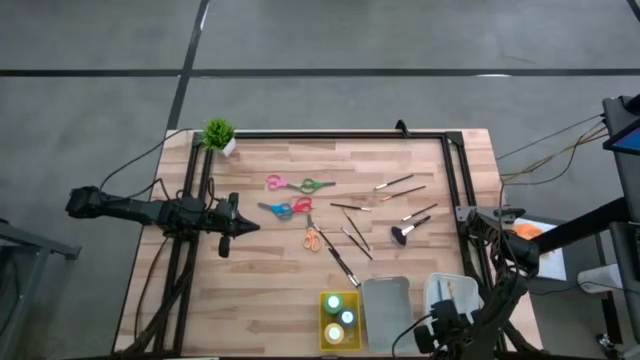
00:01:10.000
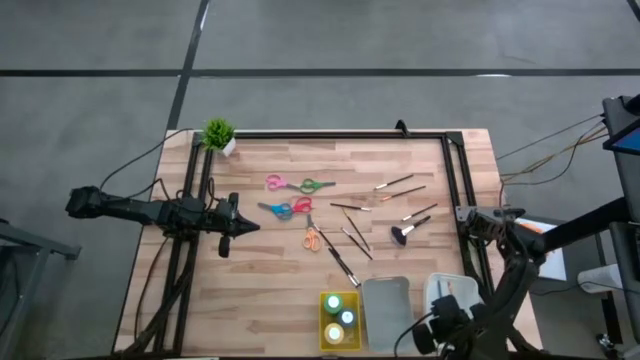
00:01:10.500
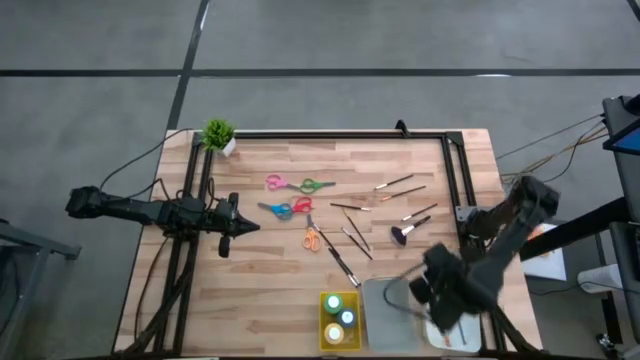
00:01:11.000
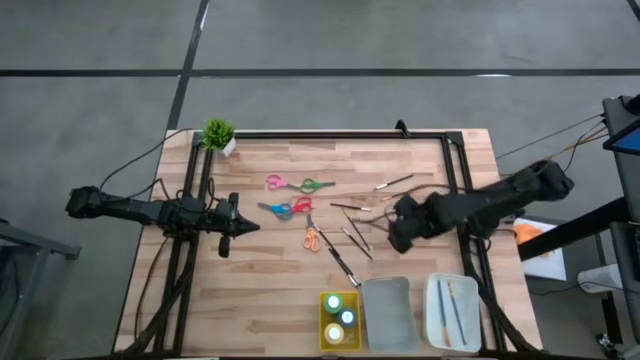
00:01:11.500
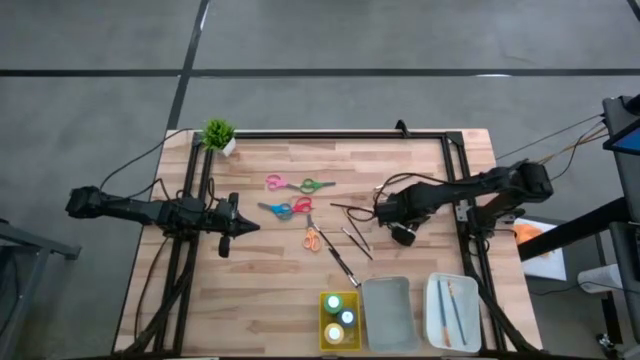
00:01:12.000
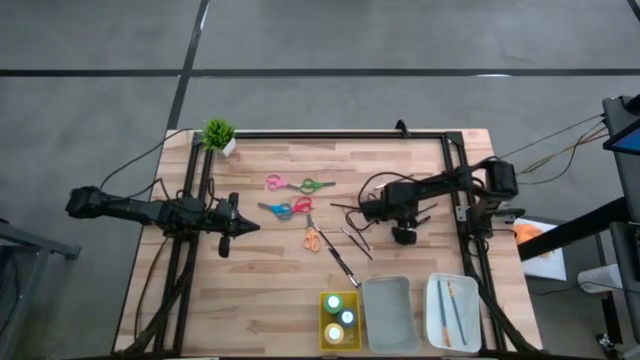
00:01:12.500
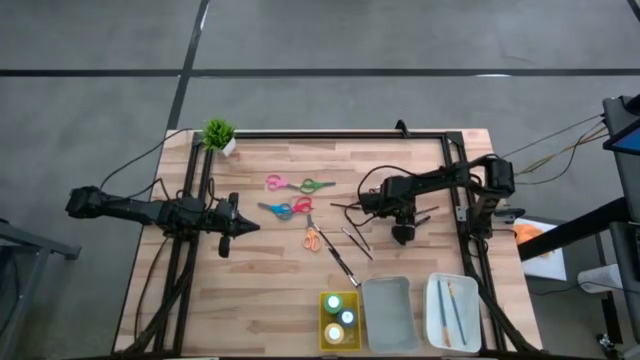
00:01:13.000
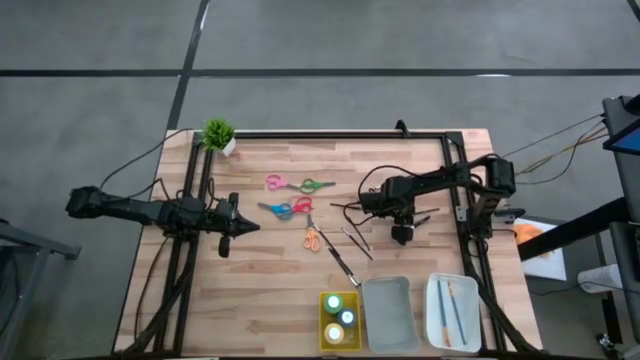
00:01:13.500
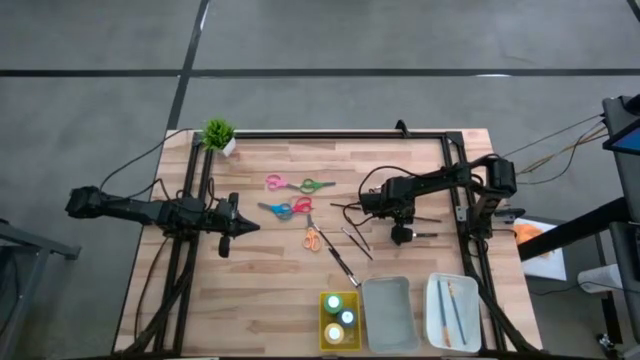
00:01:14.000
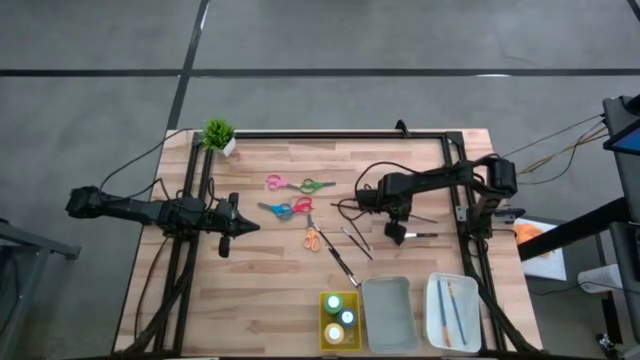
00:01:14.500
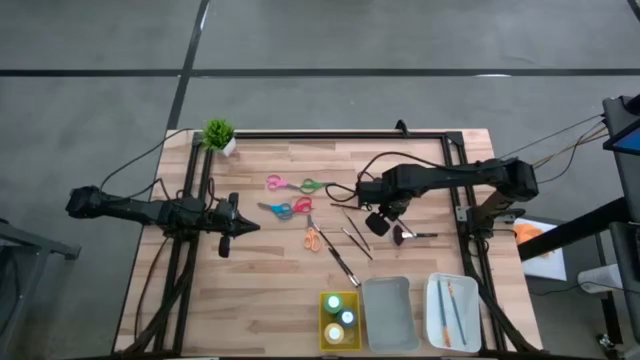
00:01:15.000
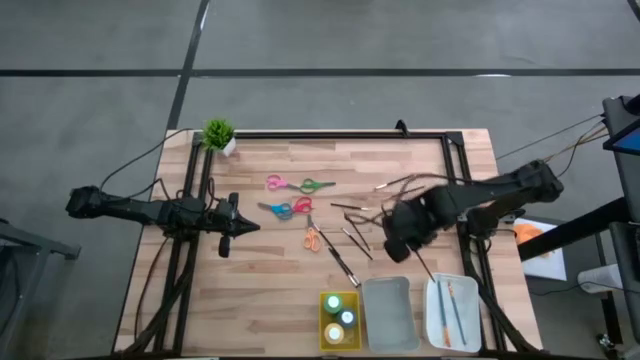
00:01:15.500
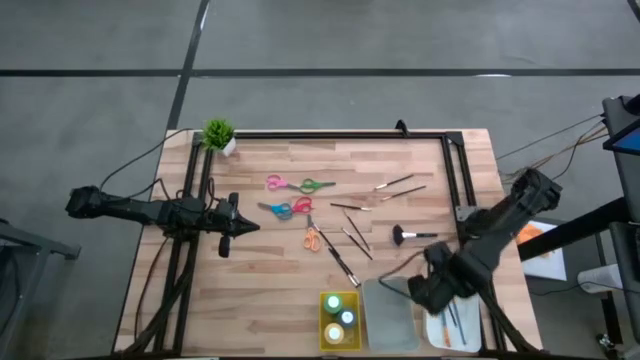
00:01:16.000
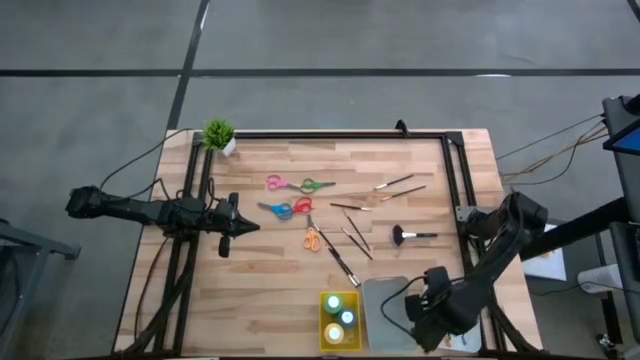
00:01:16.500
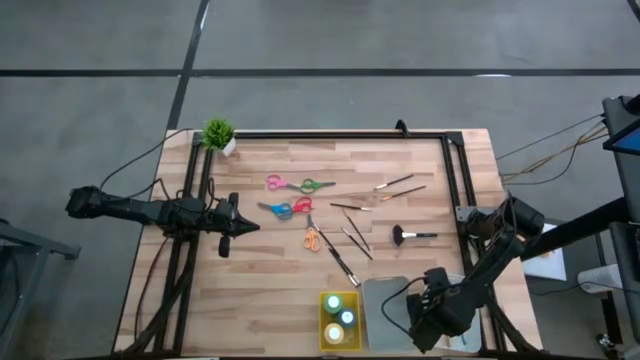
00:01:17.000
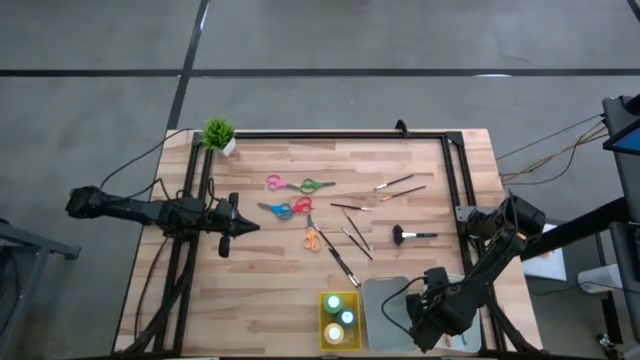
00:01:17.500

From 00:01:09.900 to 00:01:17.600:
Task: Pick & Place Paint Supplies
Put the silver brush into the white bin

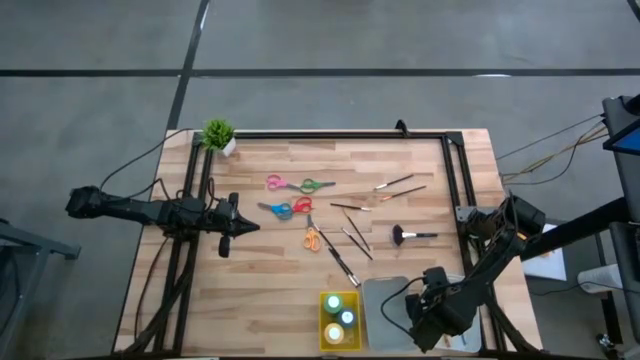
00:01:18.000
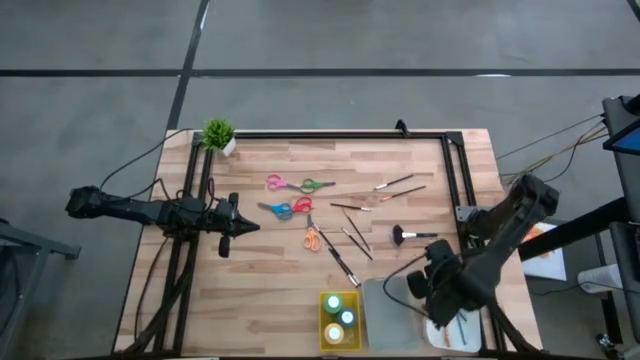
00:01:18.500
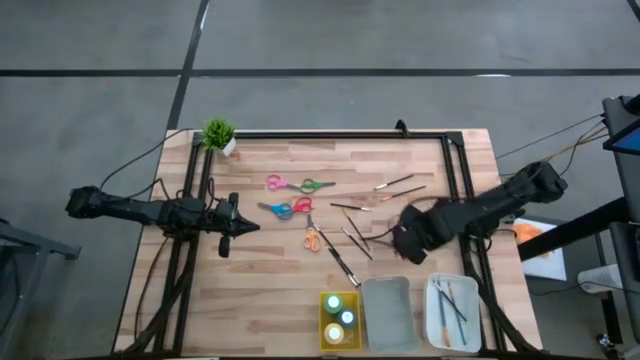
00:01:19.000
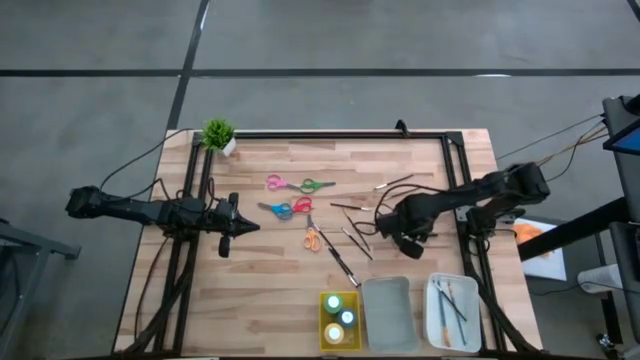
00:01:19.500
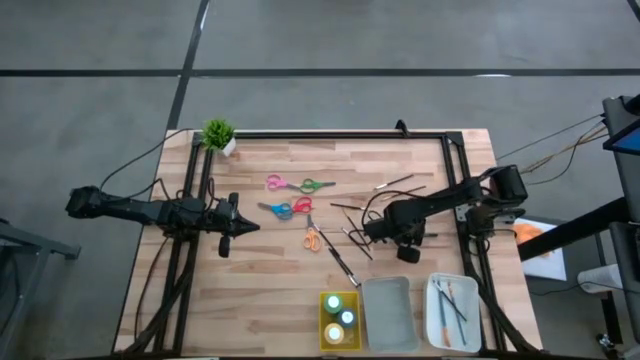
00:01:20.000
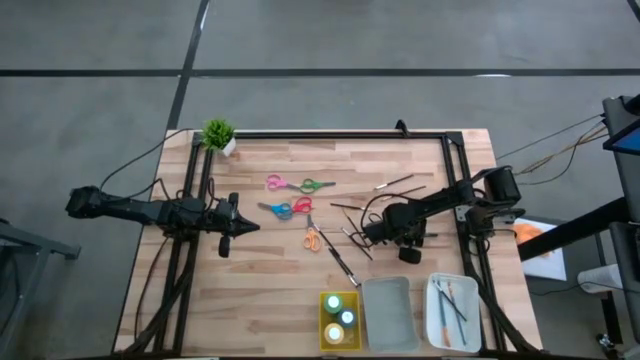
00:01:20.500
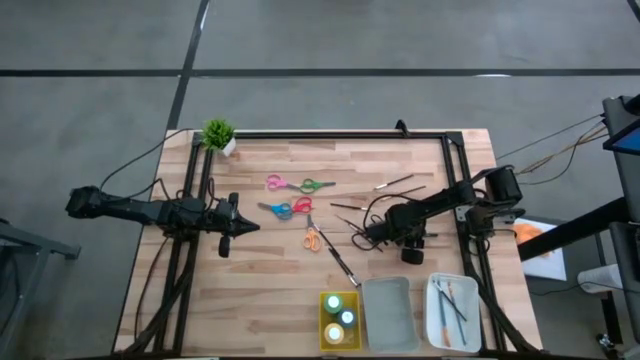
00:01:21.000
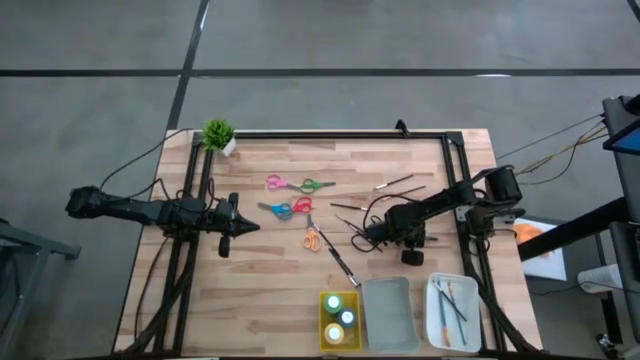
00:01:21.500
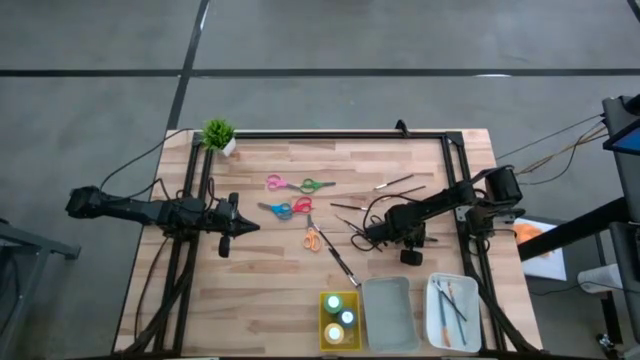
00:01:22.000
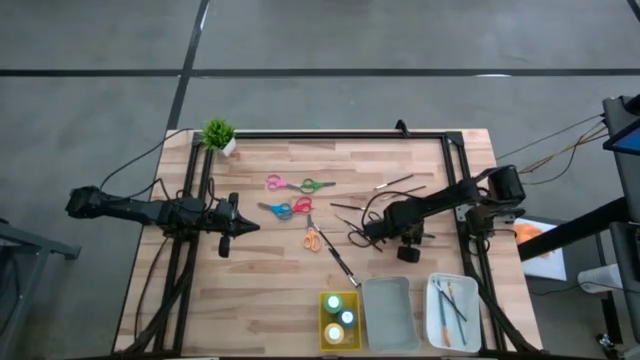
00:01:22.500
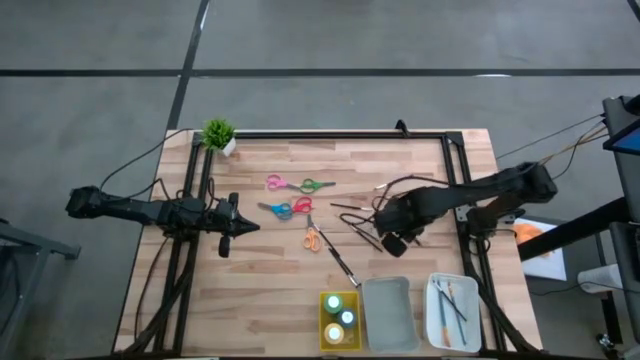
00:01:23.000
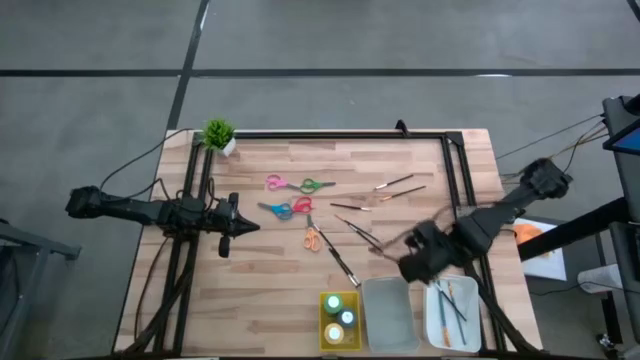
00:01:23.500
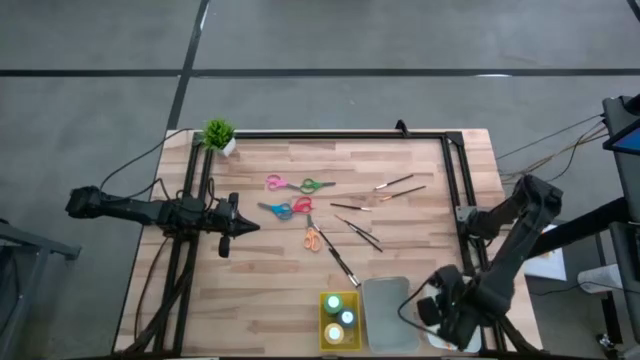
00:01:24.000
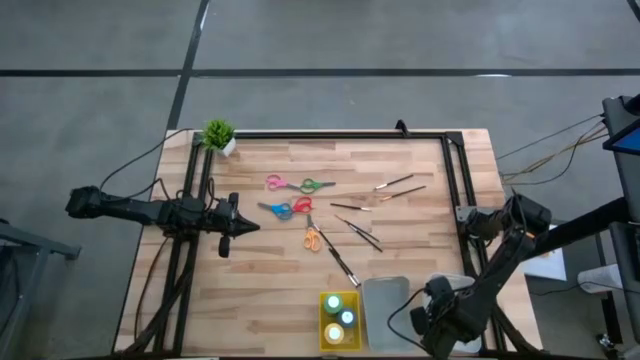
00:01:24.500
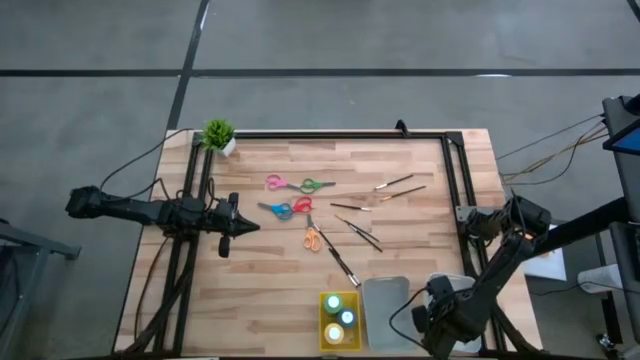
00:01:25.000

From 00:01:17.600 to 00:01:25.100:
Put the silver brush into the white bin

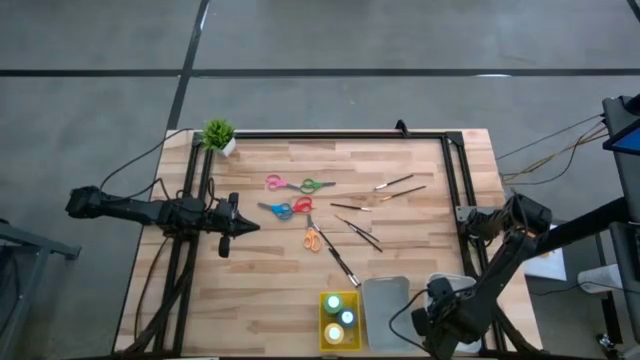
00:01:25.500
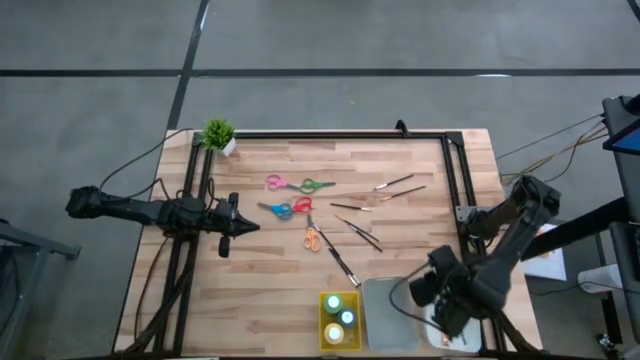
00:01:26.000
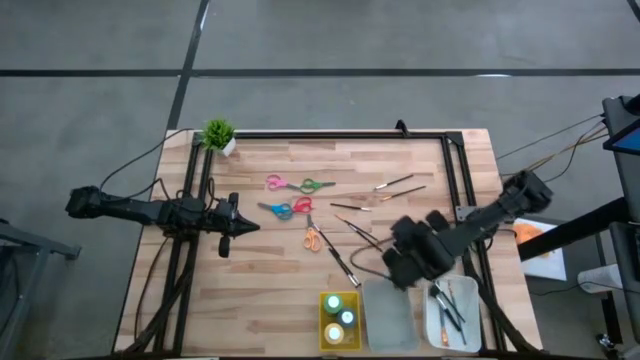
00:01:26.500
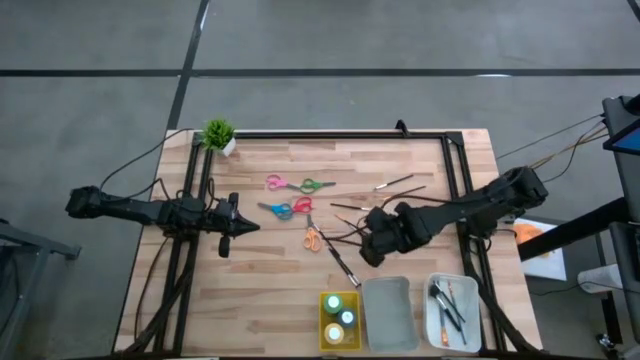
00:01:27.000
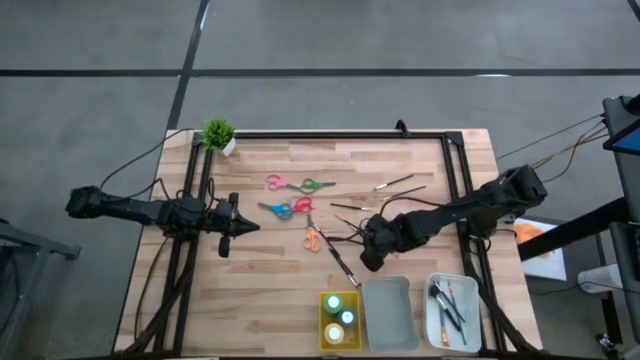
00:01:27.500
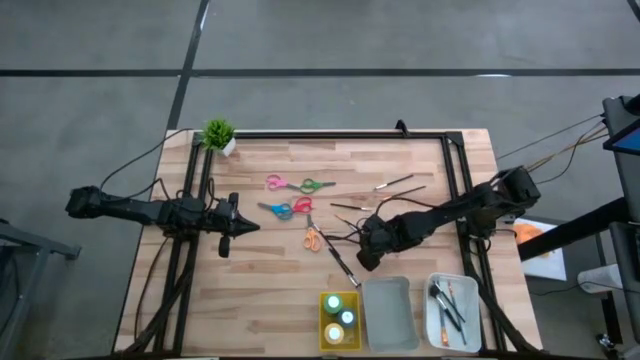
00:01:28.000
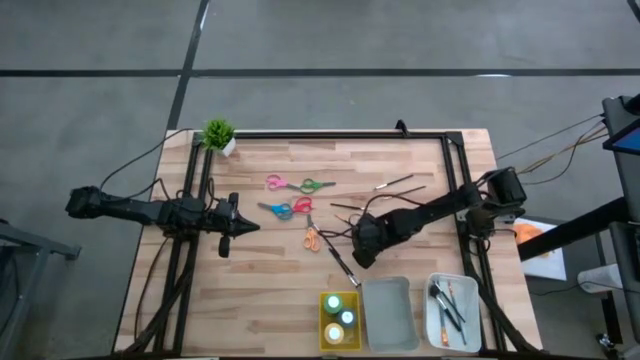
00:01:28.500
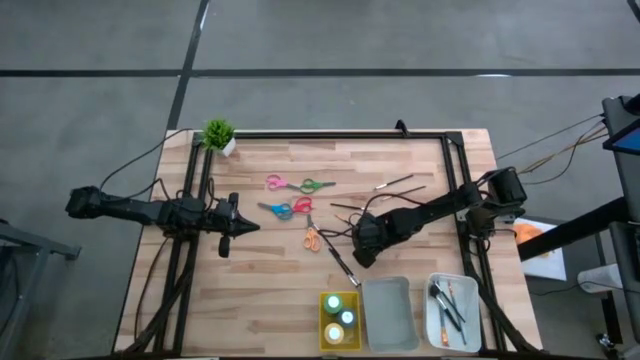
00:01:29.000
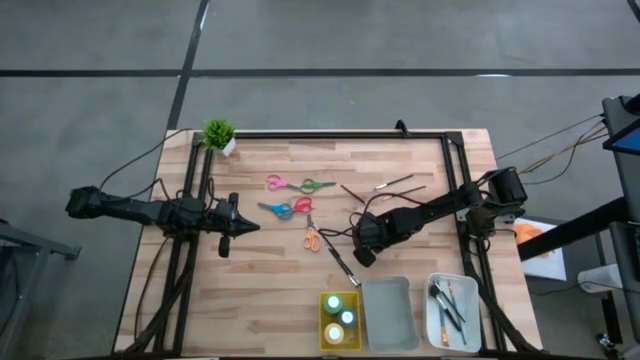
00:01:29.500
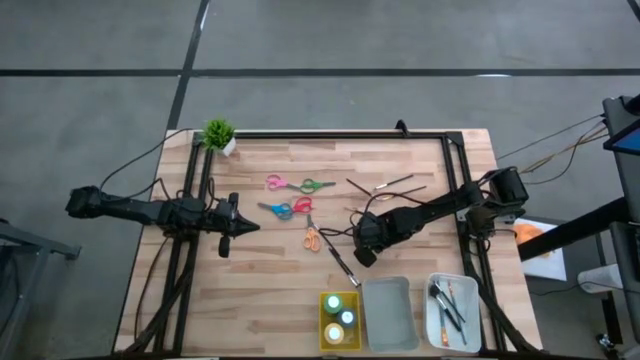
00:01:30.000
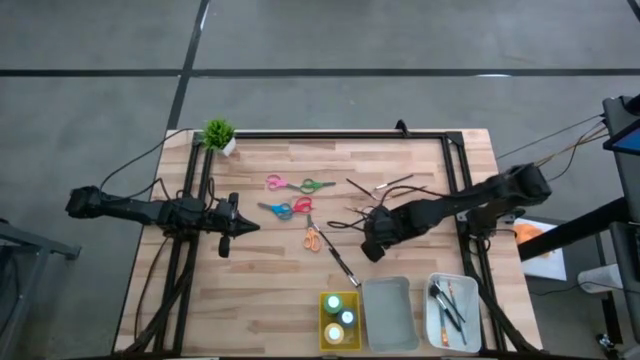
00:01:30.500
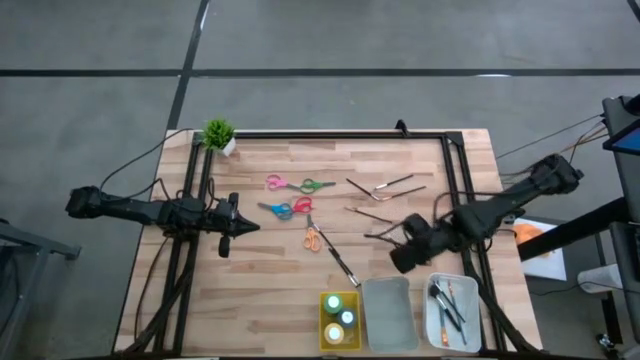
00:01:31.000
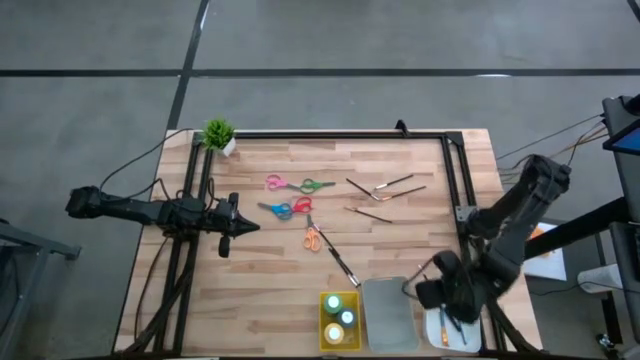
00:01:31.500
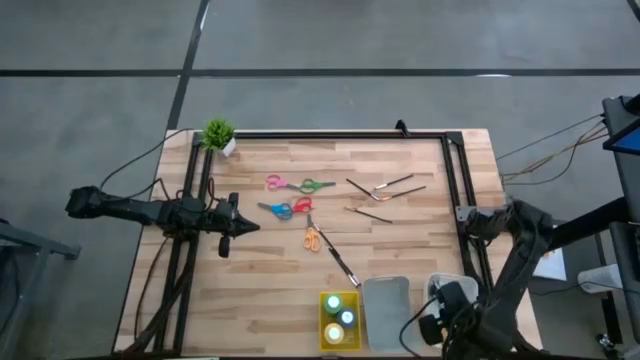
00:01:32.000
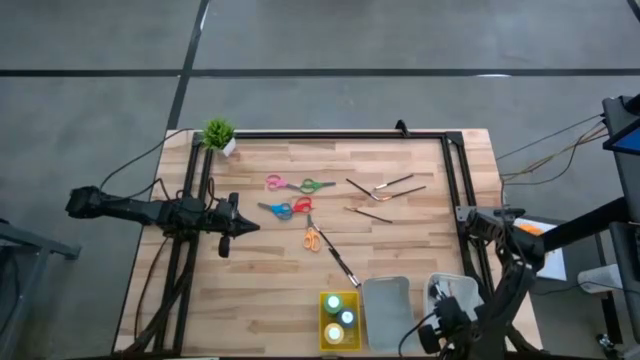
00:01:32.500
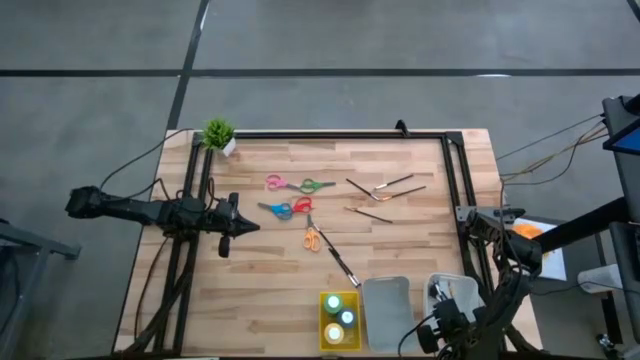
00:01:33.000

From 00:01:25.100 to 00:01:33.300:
Put the silver brush into the white bin
